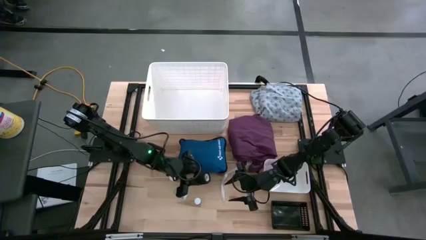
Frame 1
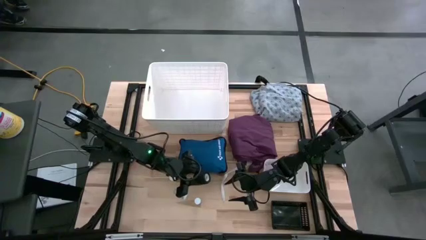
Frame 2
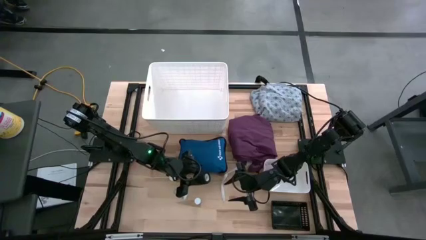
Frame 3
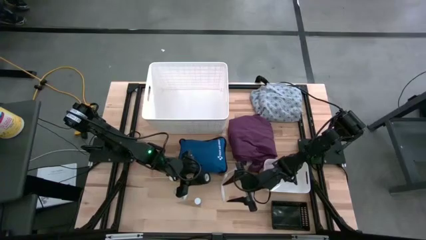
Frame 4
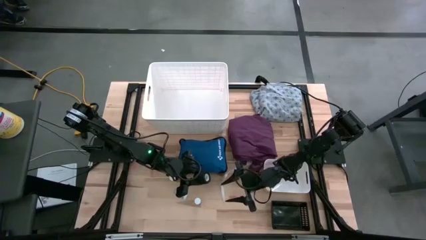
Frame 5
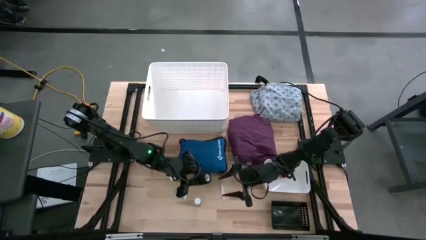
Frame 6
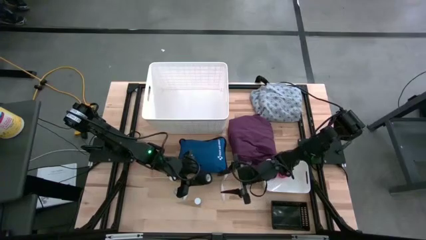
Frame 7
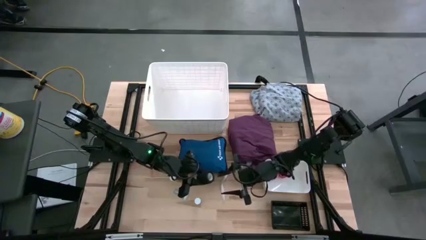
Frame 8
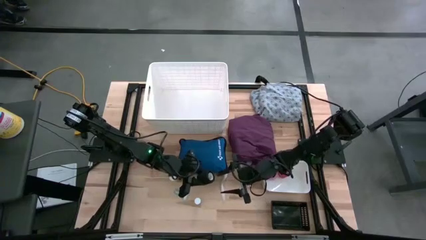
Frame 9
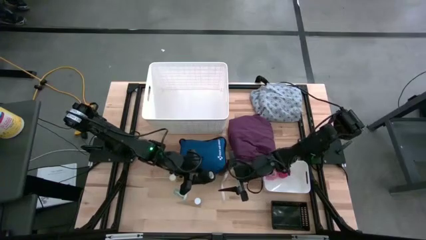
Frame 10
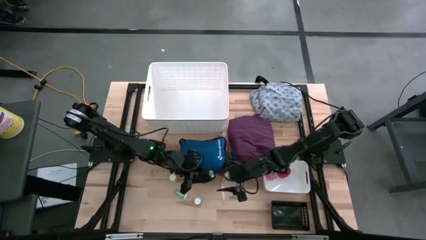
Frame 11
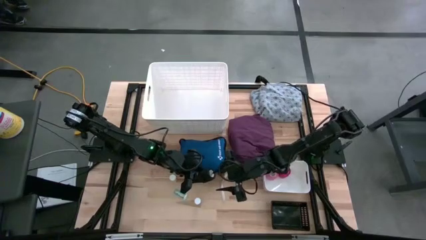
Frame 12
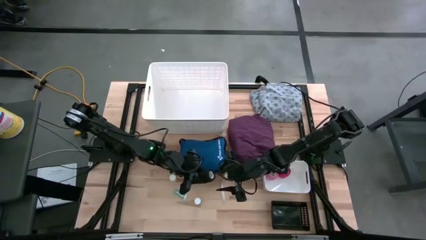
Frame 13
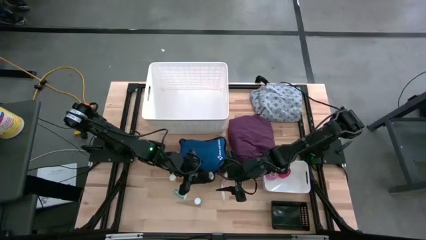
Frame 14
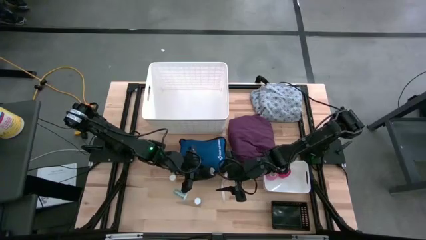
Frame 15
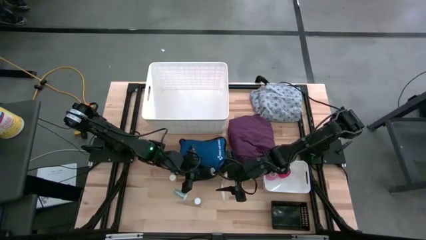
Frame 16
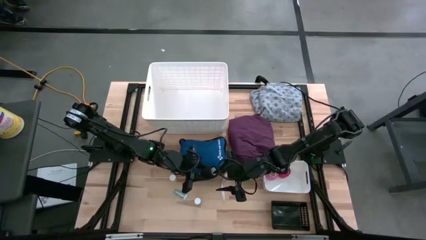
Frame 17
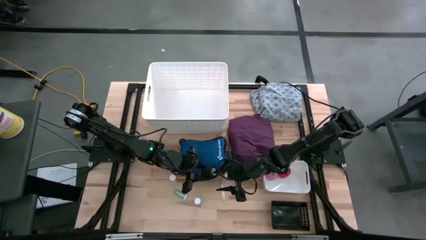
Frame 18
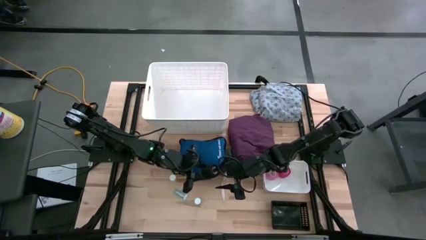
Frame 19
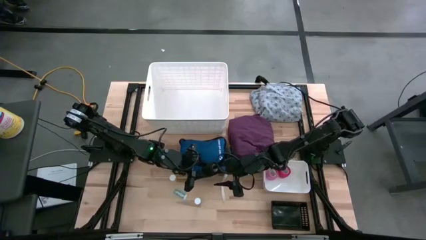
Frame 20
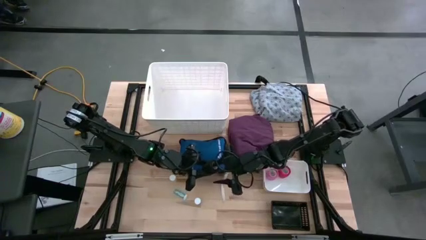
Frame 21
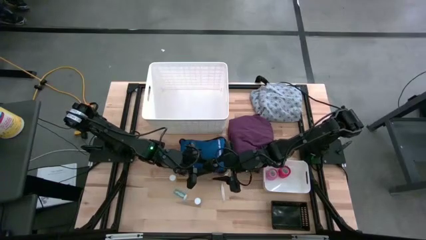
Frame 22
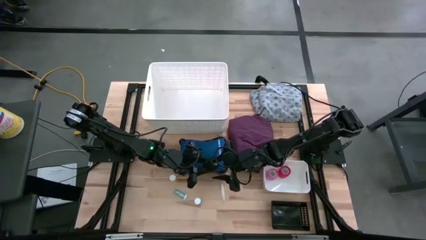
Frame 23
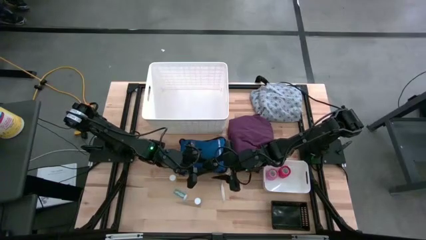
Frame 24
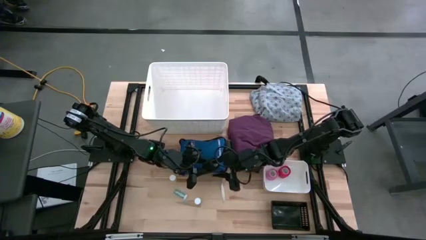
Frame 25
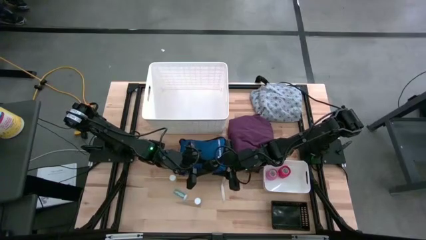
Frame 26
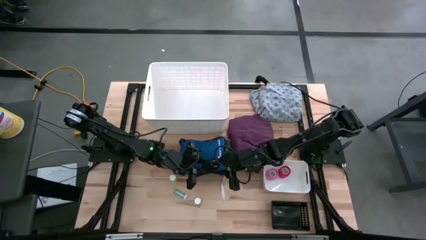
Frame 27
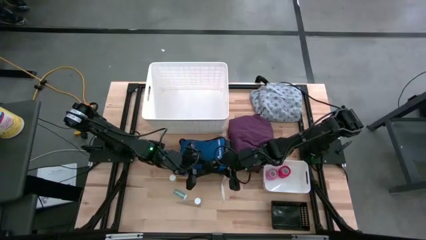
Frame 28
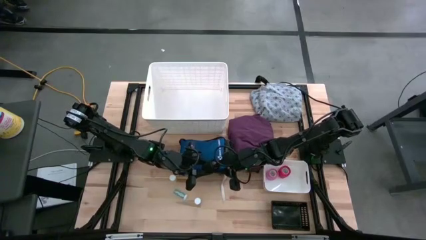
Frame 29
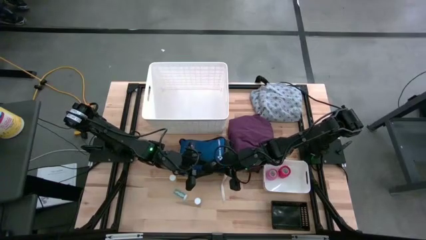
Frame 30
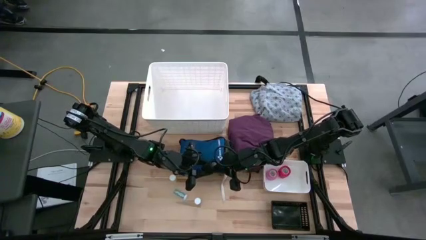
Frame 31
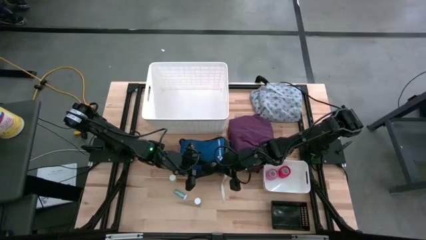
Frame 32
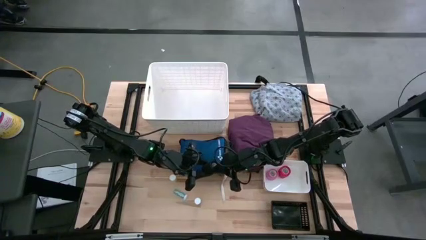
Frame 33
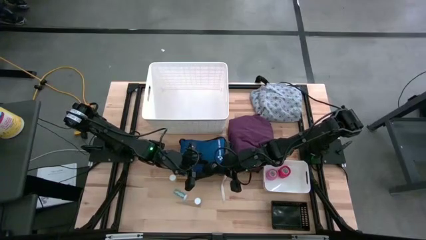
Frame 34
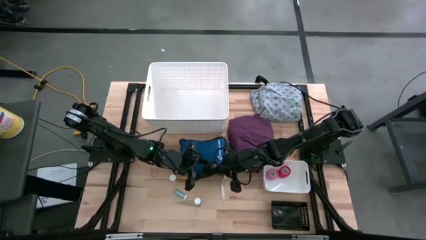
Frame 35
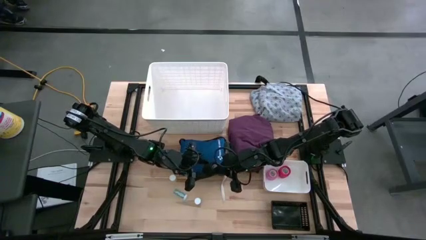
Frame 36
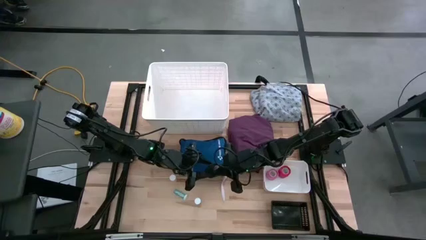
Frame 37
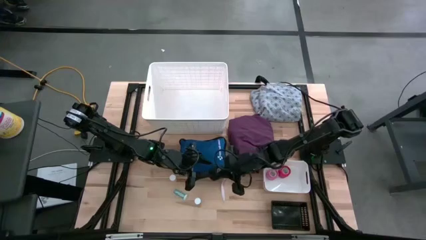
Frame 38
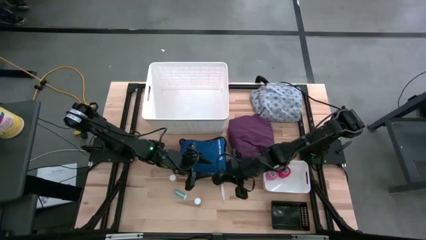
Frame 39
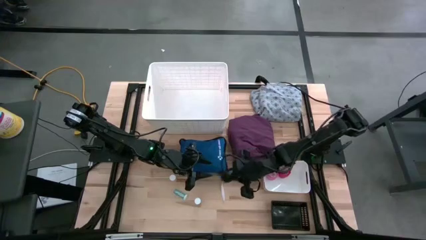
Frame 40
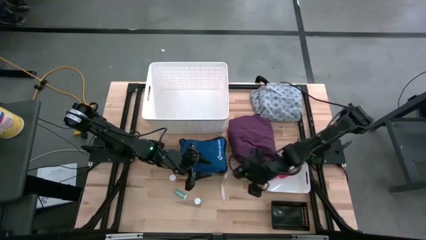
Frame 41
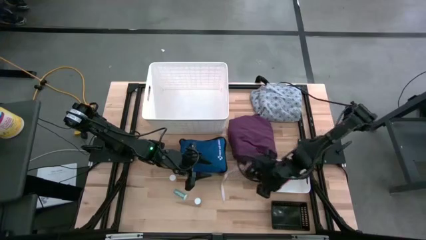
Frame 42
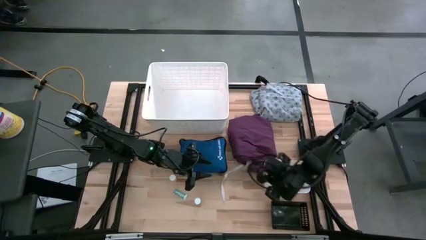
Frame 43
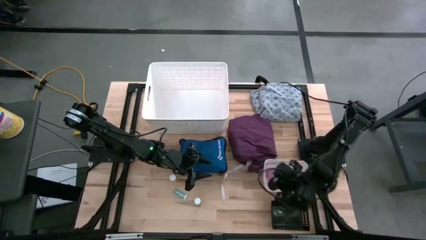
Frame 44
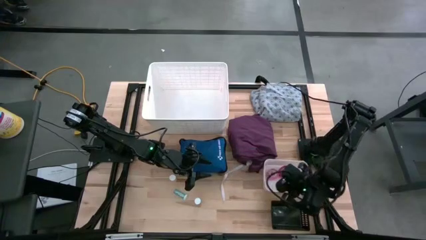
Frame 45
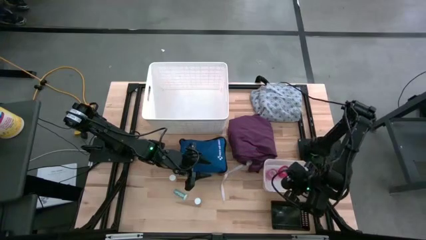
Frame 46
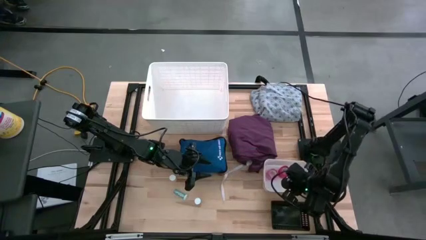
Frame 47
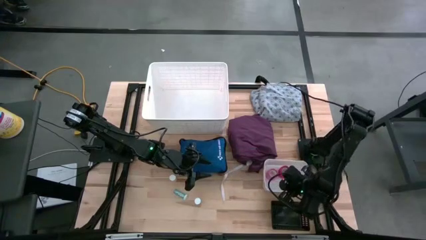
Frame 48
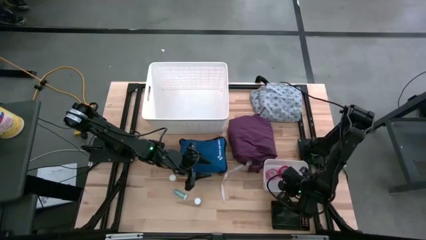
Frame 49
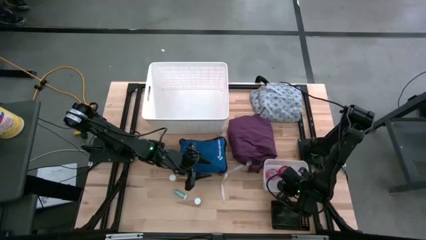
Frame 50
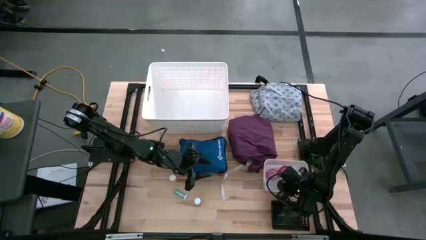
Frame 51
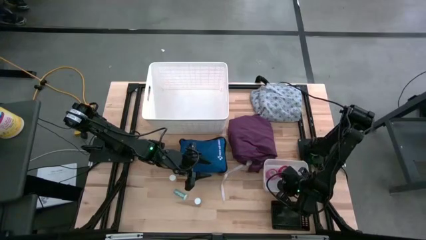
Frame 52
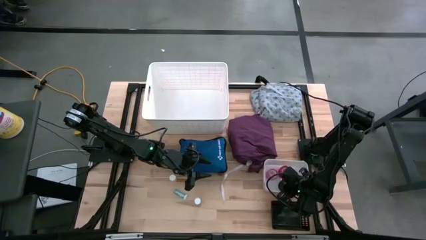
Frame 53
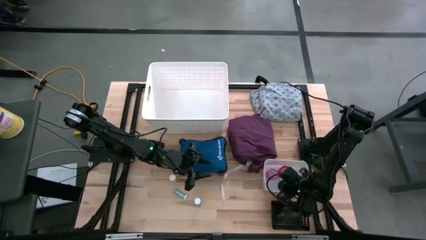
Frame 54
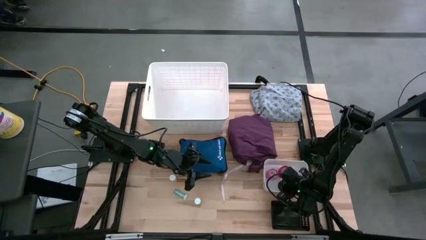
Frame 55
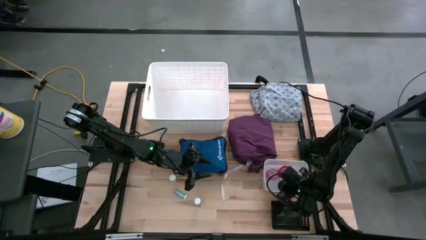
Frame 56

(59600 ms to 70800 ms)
Task: Pick & Place Medicine items
Put the black bandage into the white bin

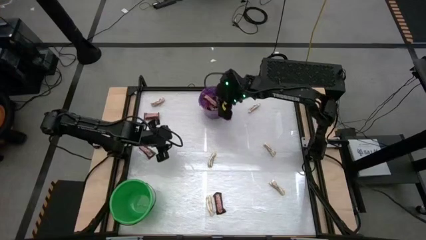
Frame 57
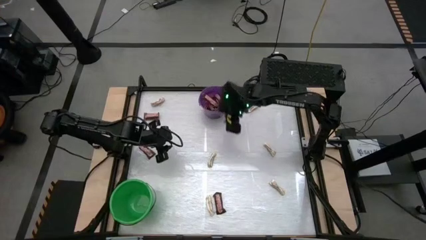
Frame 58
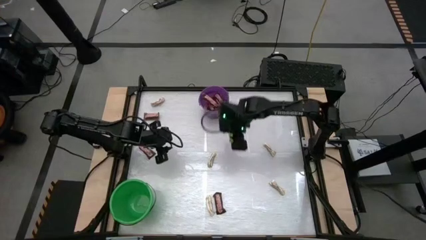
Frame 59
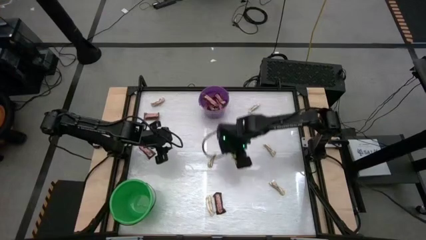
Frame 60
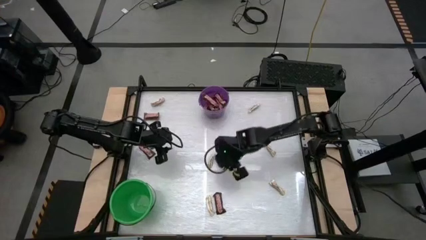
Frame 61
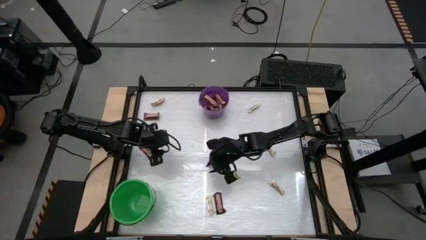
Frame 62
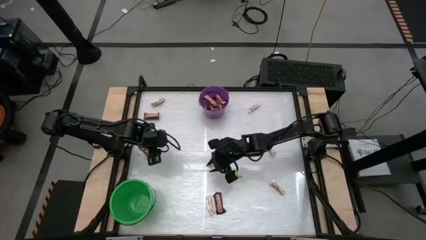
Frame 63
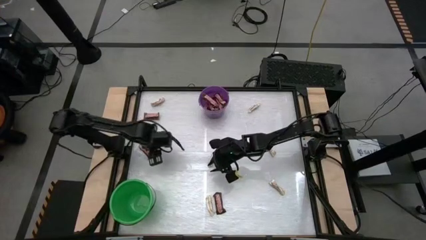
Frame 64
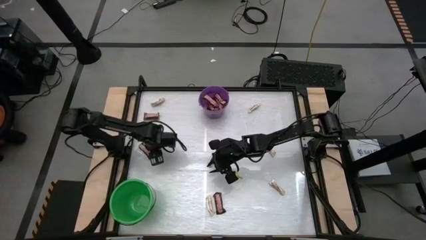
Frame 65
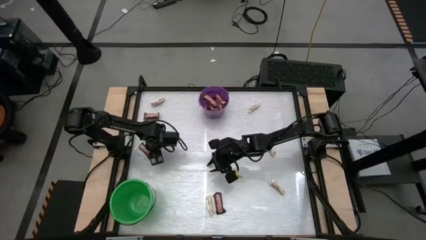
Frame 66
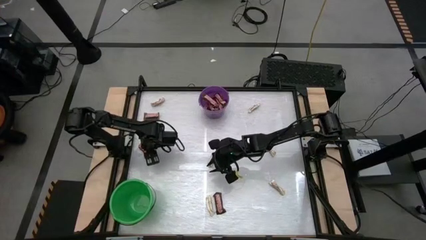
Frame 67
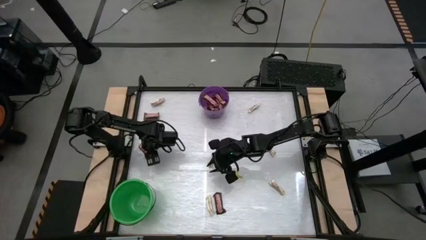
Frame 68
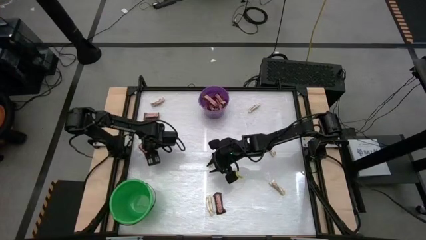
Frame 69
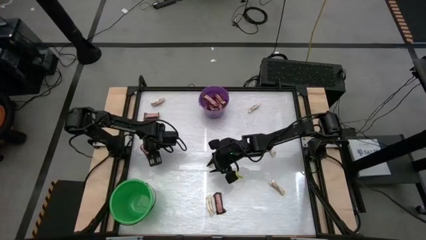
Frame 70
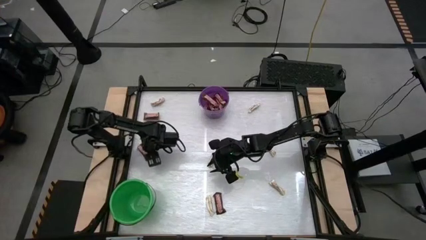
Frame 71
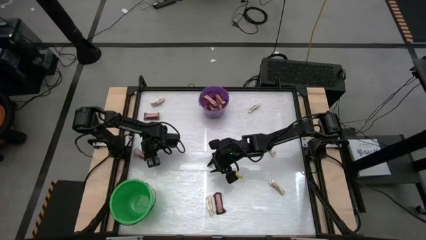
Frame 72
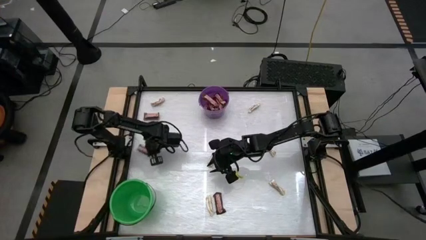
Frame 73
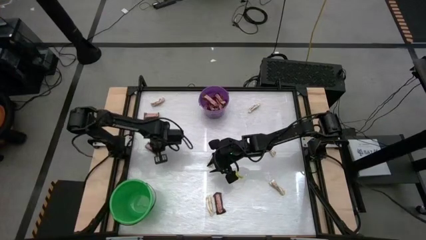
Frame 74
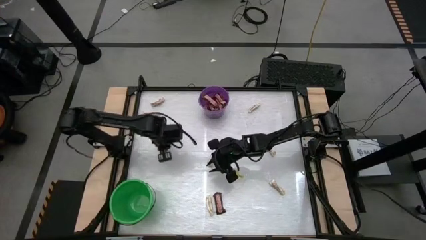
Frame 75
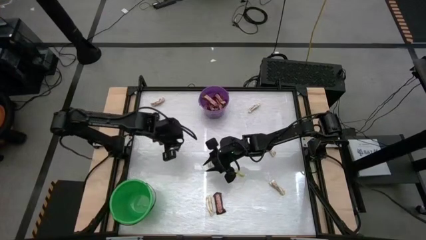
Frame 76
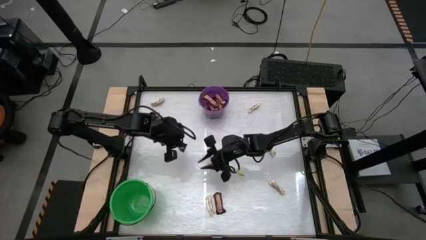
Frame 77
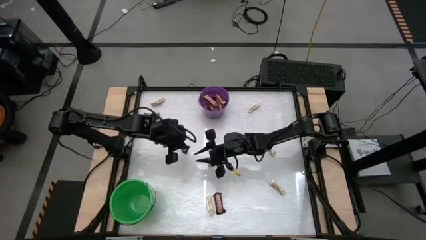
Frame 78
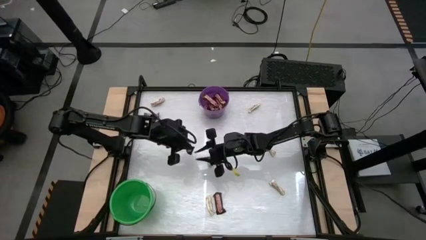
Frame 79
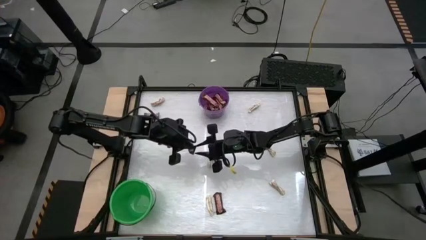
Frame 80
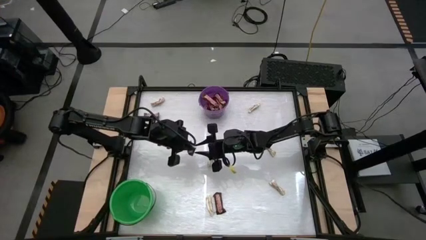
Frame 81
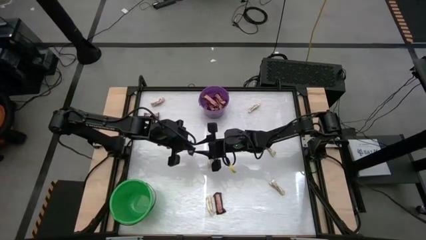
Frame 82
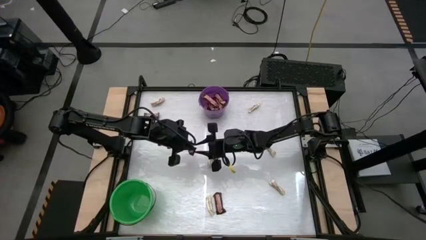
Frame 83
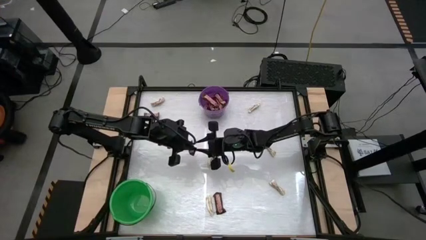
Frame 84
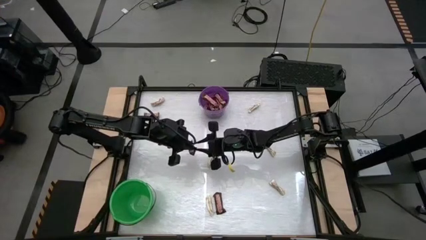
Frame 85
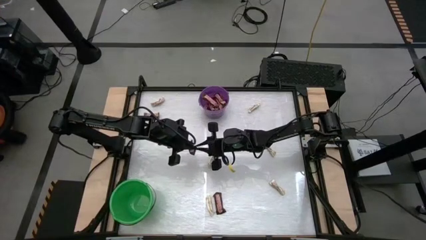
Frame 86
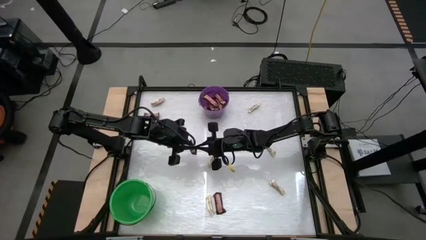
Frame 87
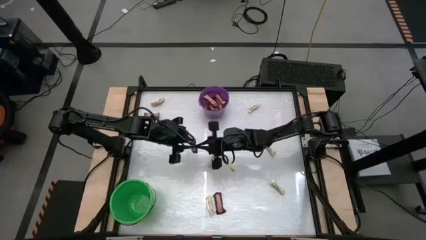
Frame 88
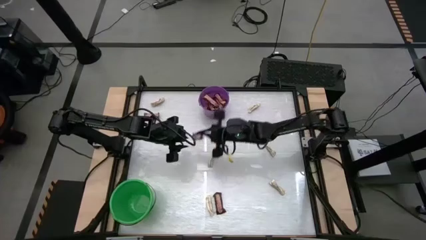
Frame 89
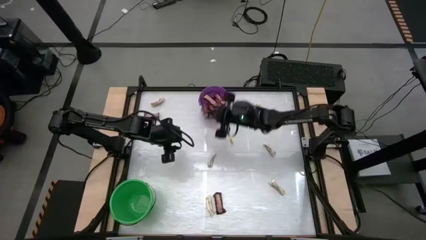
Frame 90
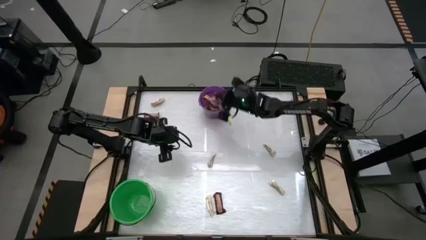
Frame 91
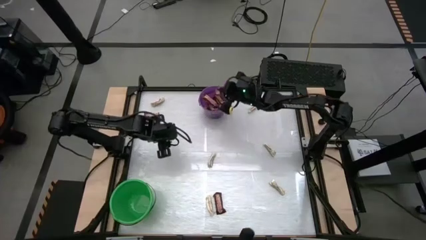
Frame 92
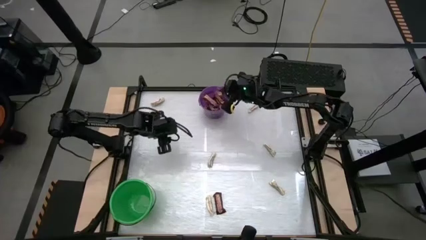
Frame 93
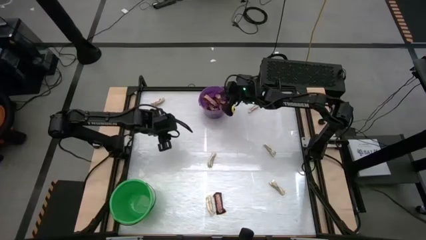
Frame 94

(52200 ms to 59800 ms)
Task: Sort candy by brand, put in halloween buckets
Put the brown chocolate into the purple bucket
